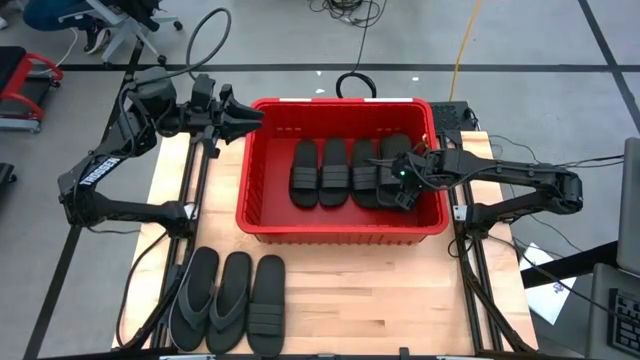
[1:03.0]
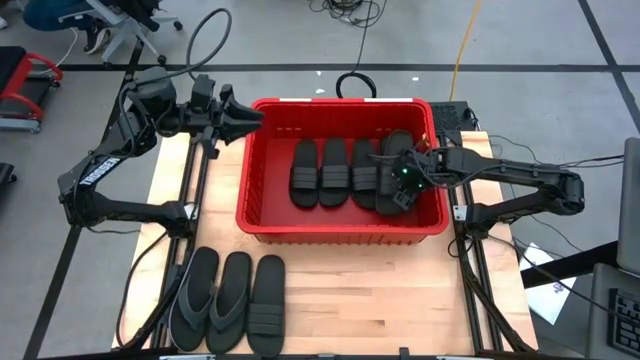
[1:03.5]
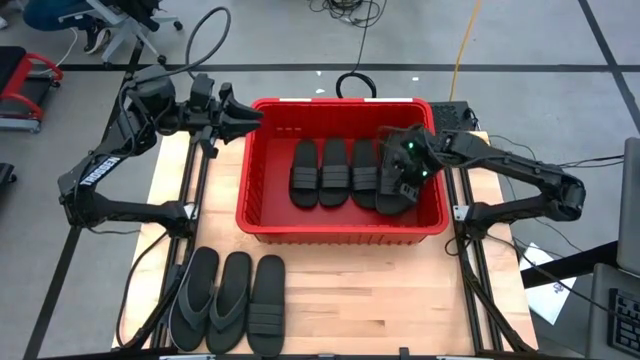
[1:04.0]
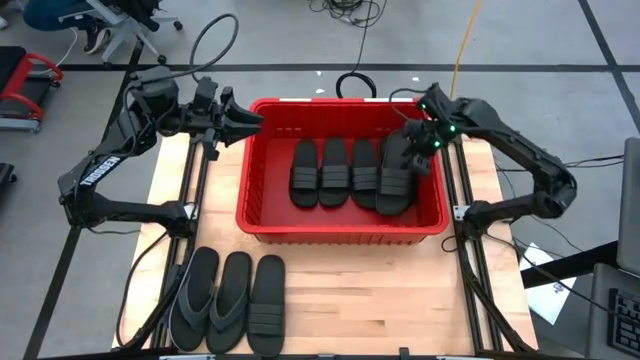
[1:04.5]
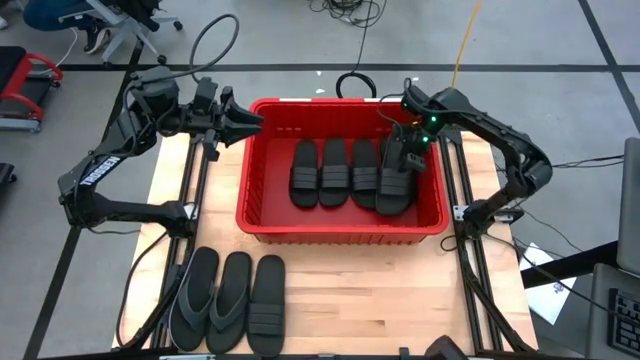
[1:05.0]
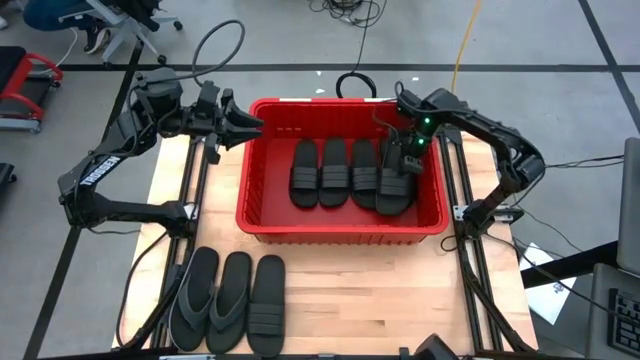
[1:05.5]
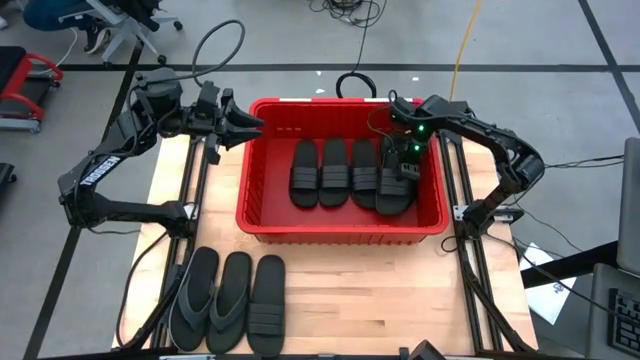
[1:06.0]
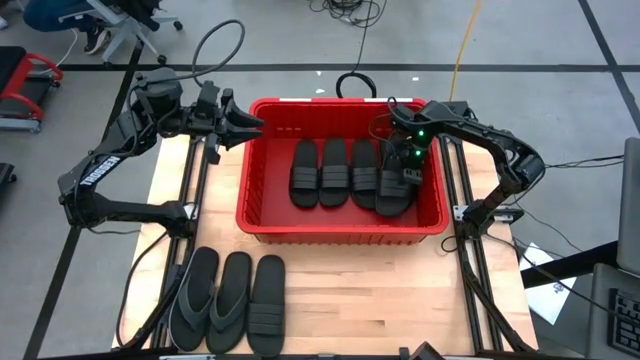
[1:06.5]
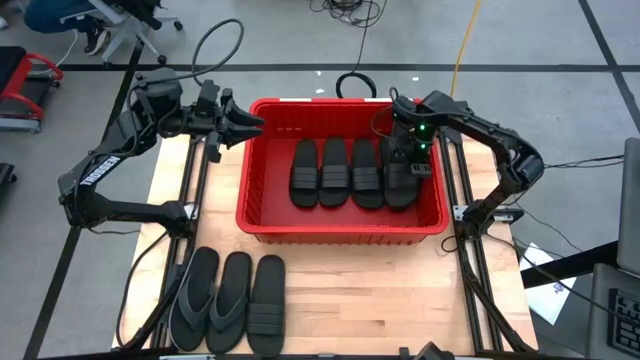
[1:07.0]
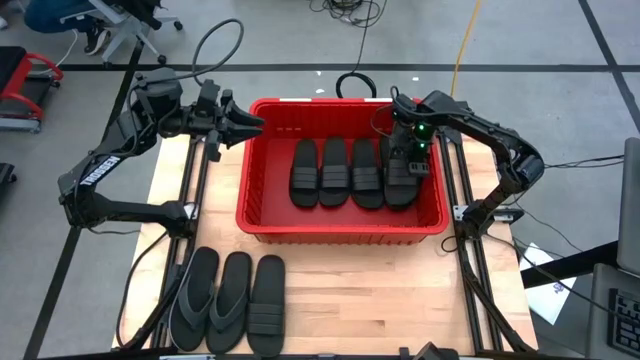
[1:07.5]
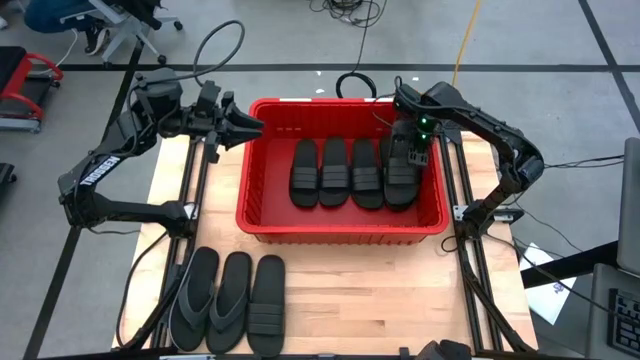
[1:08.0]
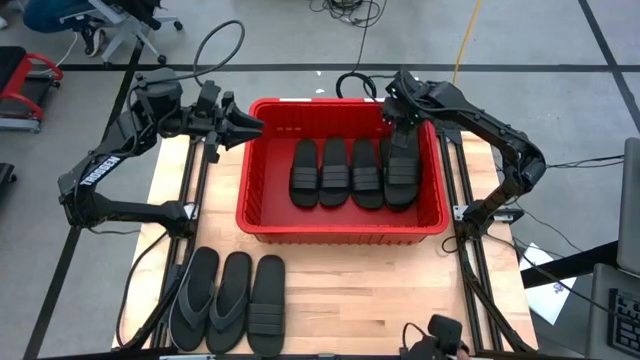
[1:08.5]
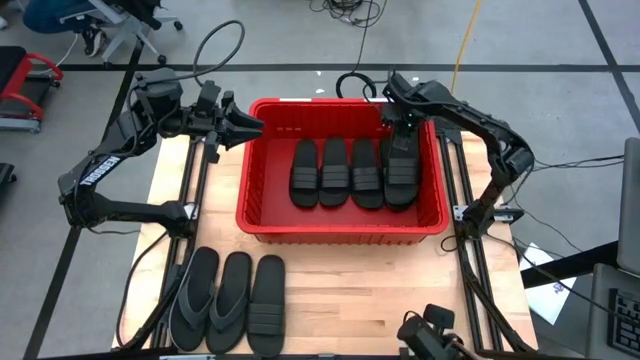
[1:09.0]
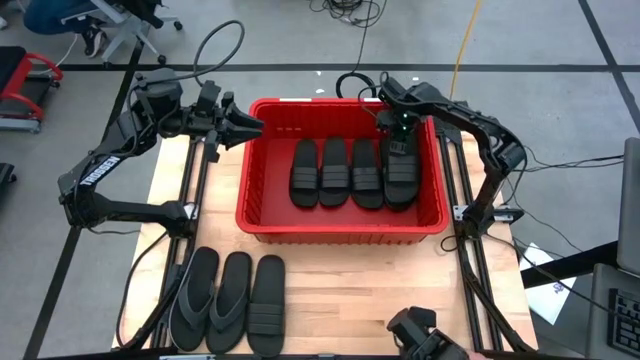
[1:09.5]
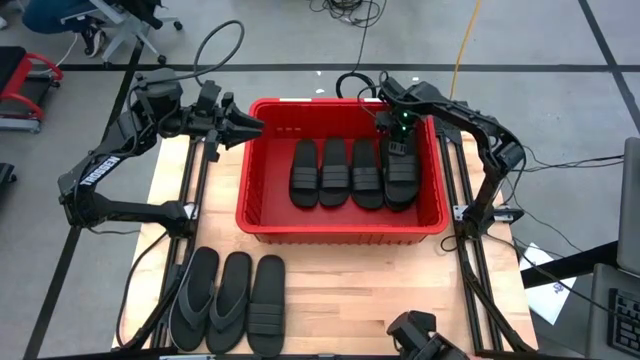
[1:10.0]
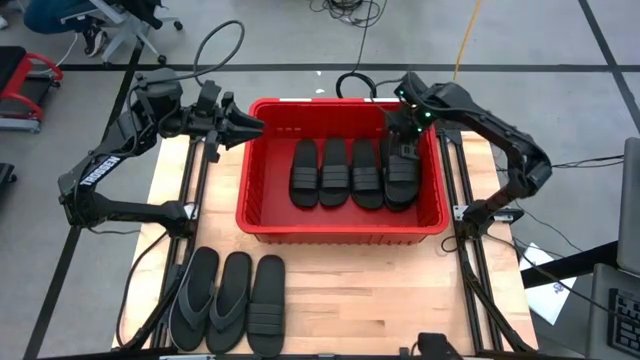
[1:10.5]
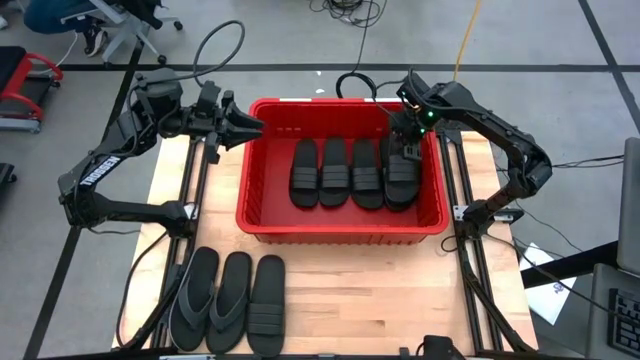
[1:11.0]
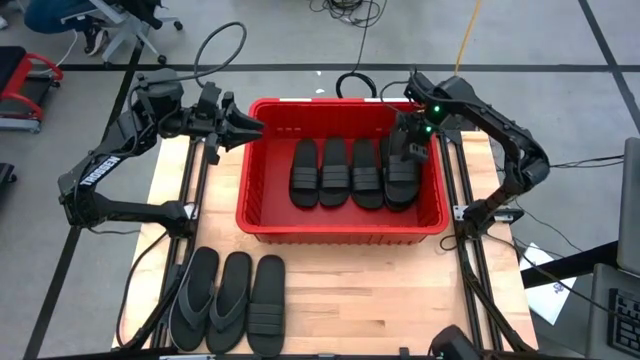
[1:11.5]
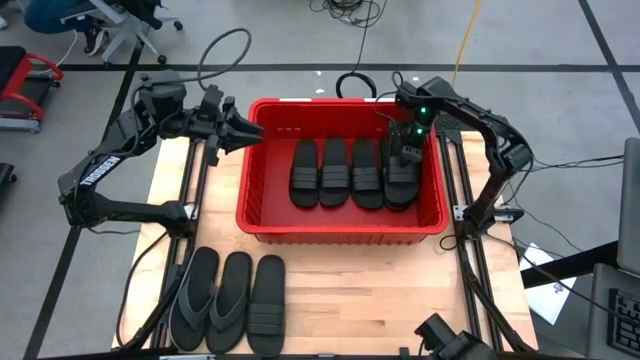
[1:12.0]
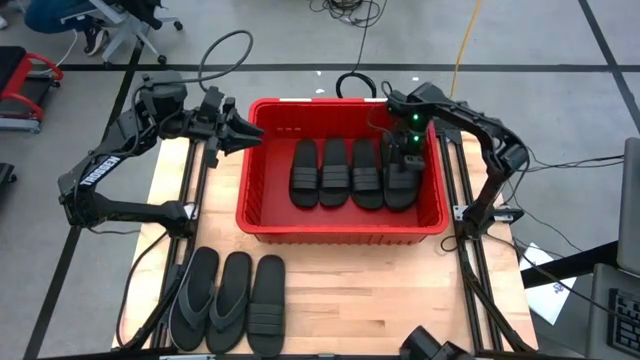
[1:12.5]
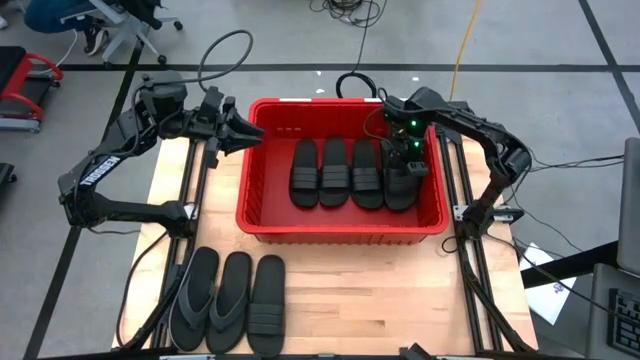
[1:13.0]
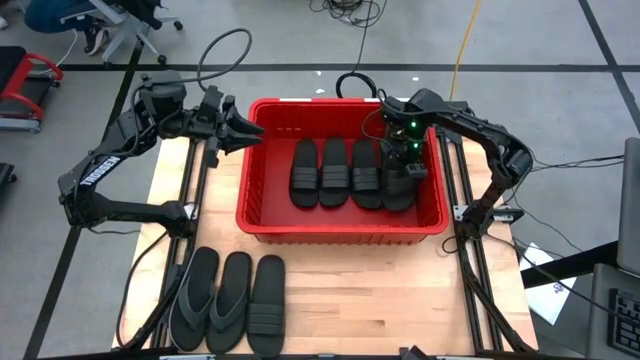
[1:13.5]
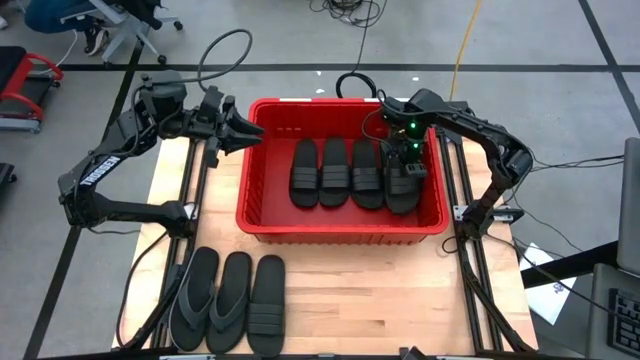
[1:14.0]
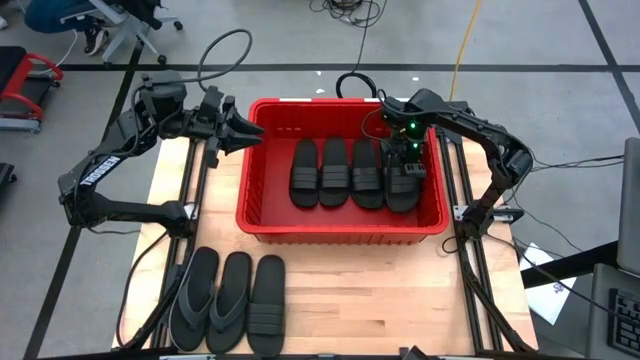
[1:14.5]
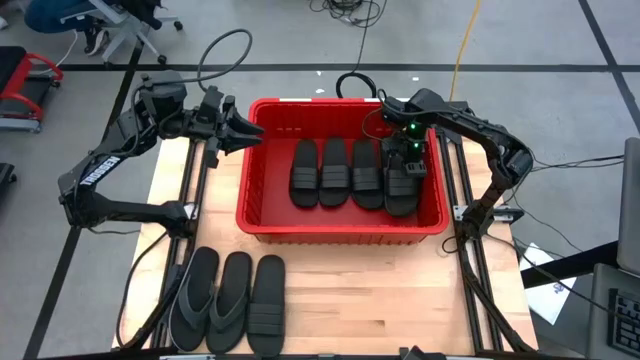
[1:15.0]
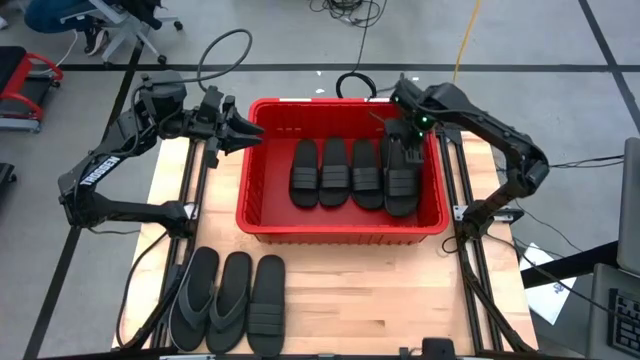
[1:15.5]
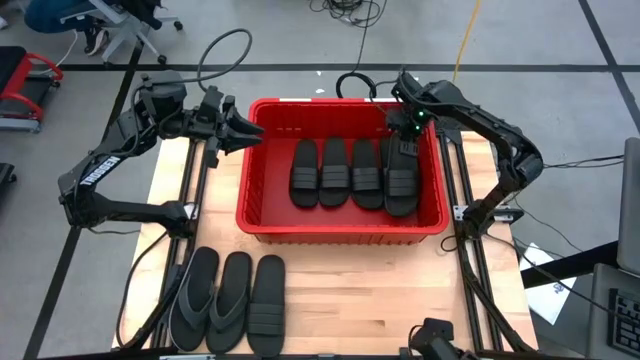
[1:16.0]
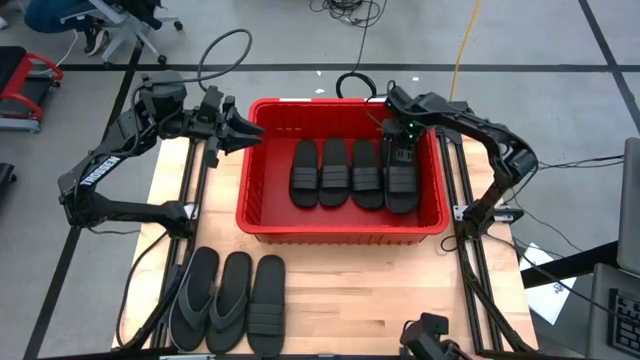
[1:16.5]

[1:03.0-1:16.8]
Task: Pick and place slides into bin
Put the black slipper into the red bin

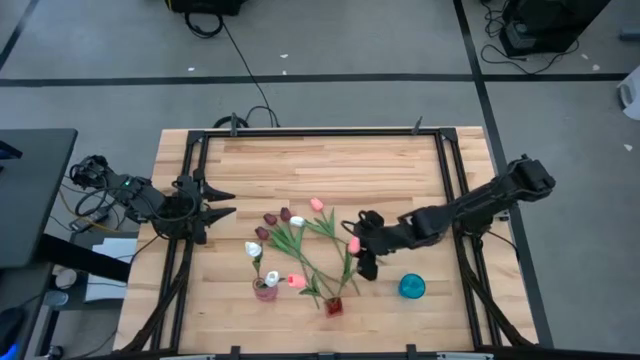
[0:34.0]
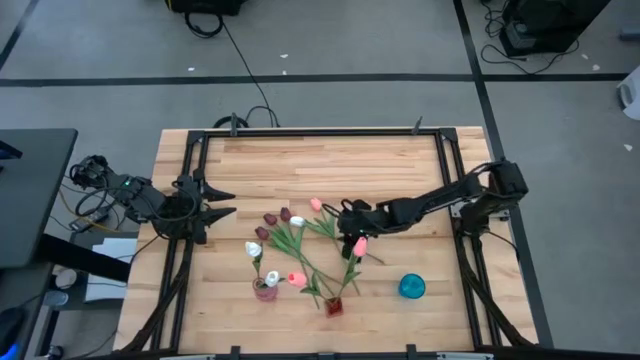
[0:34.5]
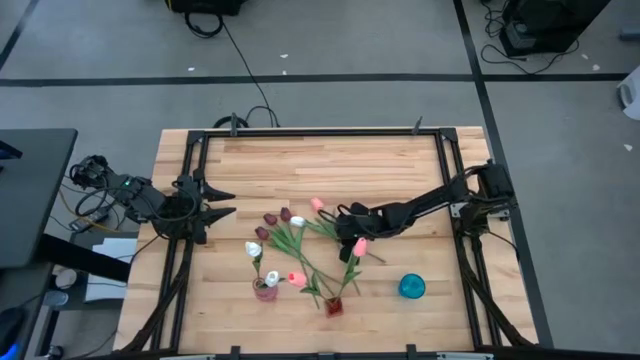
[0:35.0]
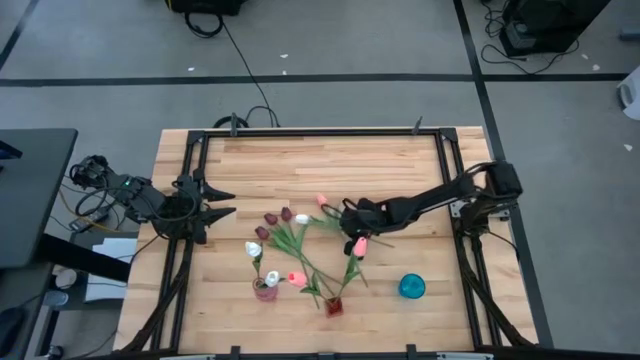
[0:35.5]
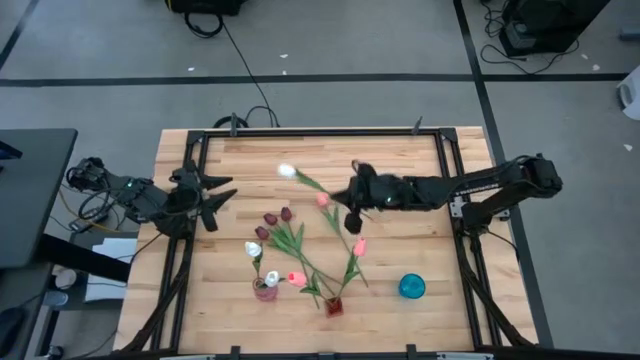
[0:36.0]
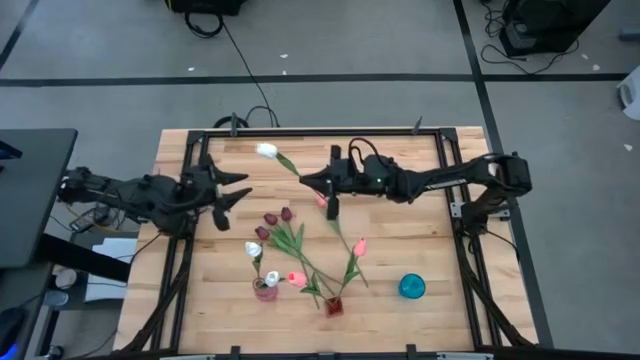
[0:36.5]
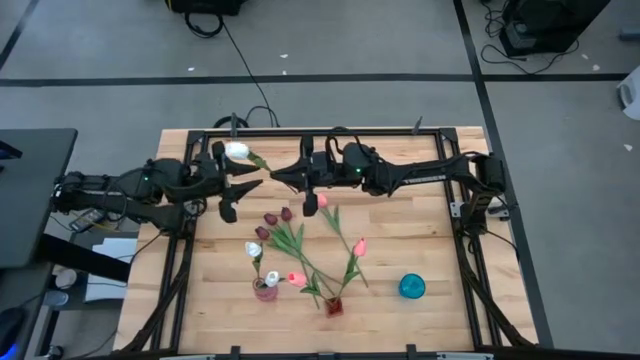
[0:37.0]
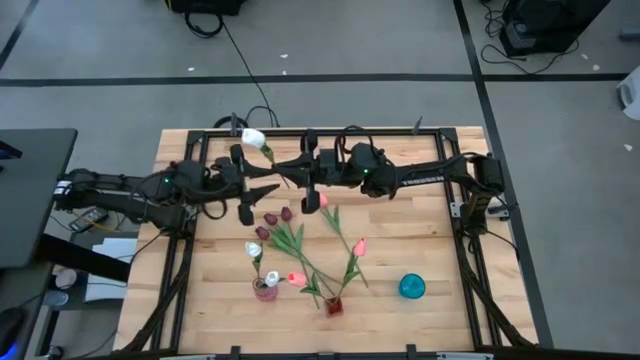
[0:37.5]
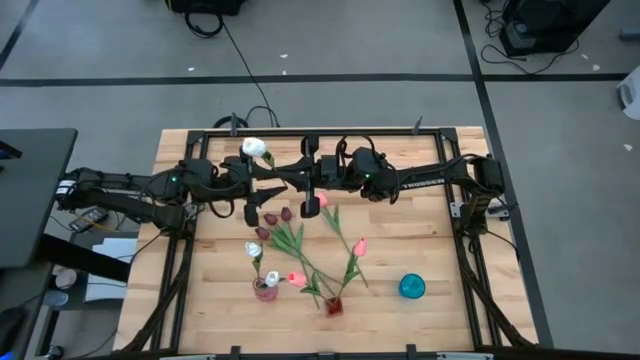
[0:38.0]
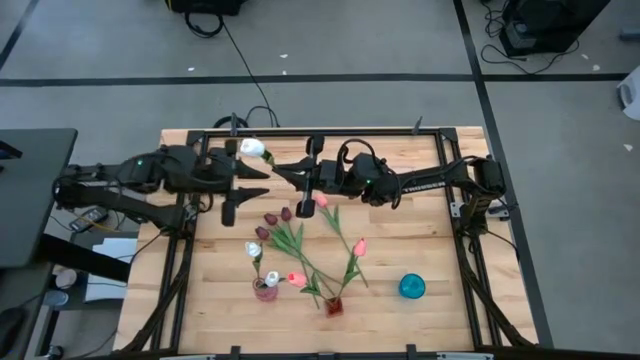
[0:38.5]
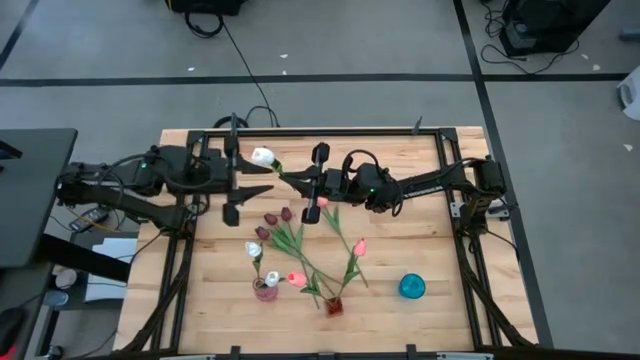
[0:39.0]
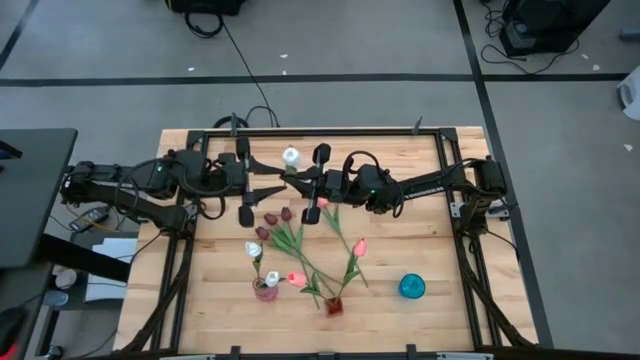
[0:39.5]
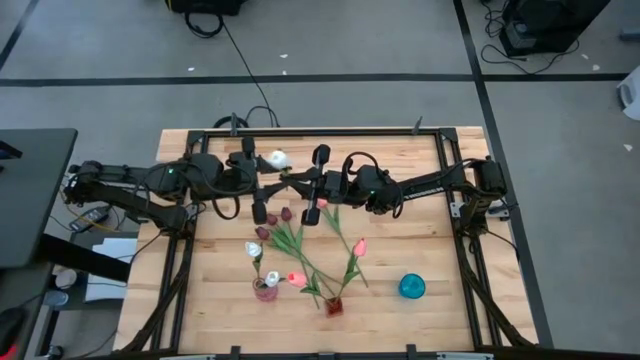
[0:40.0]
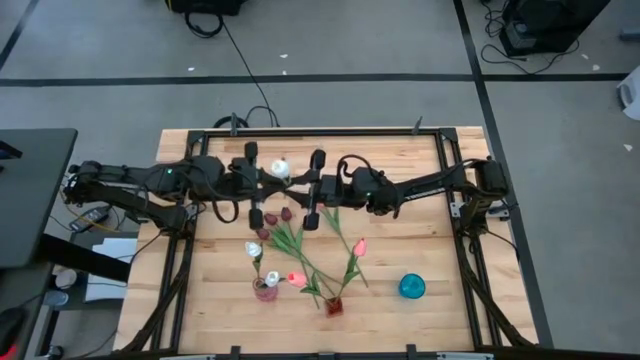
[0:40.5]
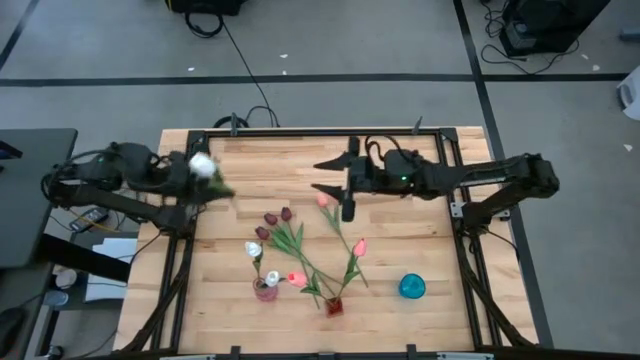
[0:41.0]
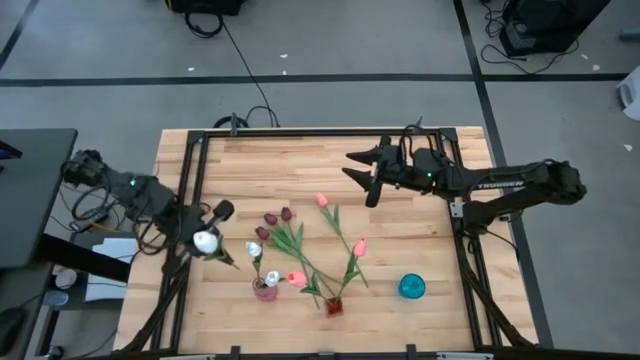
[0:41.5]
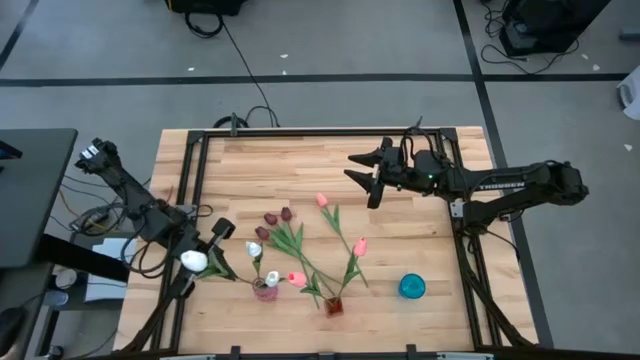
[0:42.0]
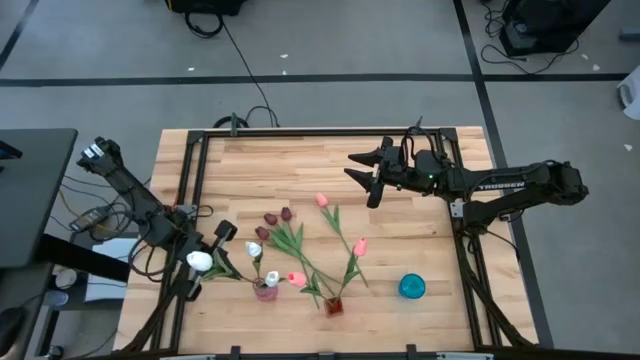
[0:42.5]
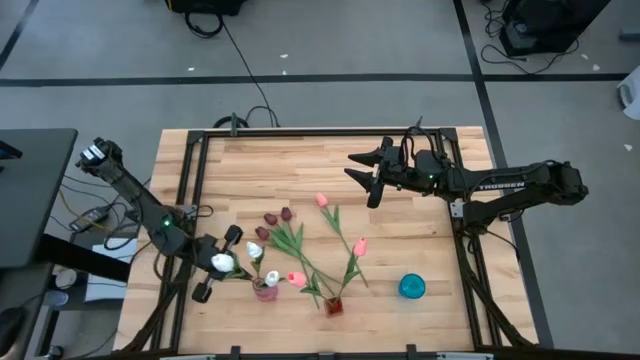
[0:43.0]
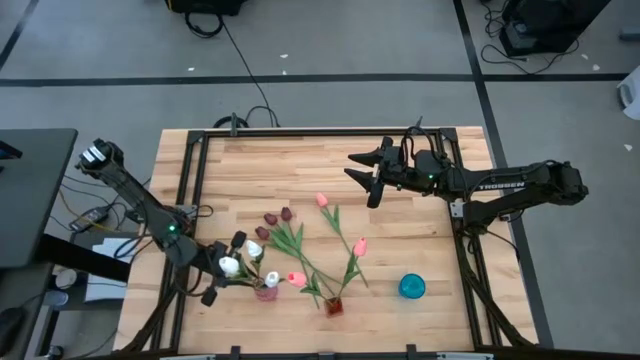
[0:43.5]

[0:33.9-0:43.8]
Task: Sort flowers into vase by color
Put the white flower into the pink vase
